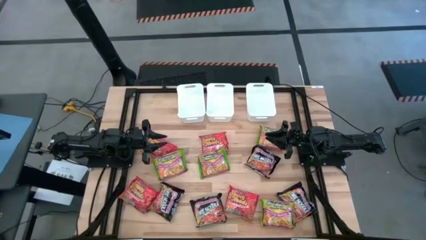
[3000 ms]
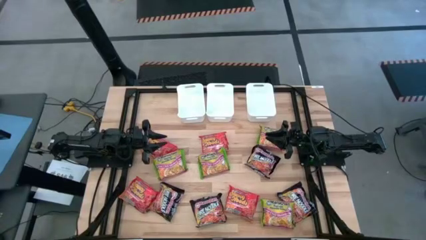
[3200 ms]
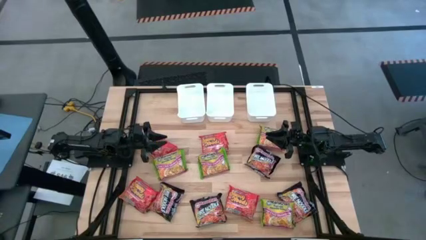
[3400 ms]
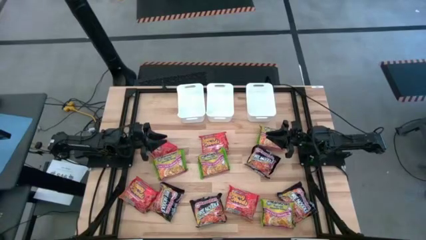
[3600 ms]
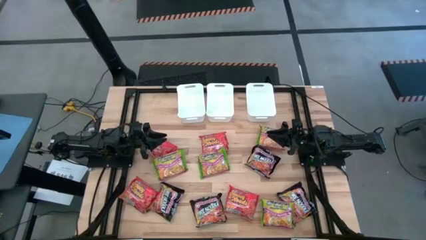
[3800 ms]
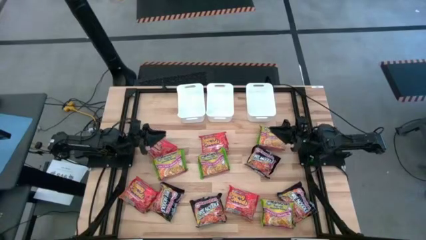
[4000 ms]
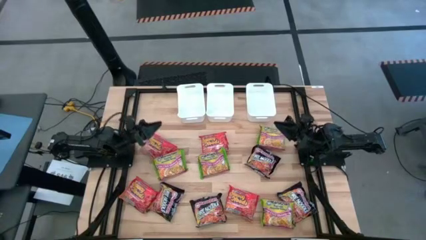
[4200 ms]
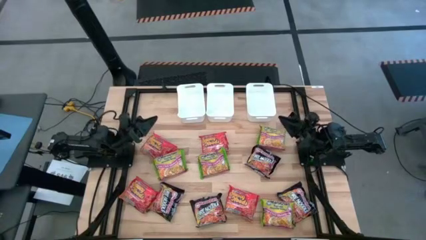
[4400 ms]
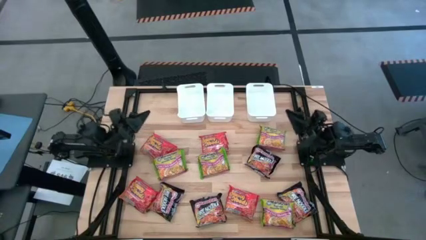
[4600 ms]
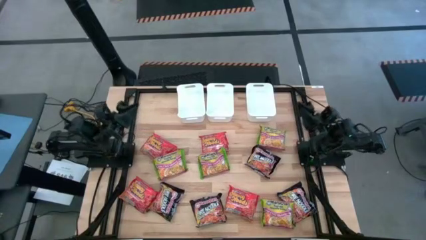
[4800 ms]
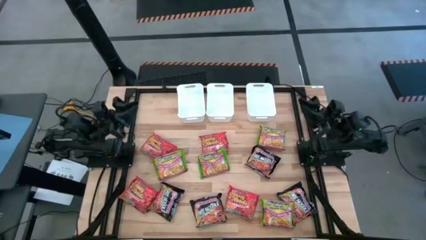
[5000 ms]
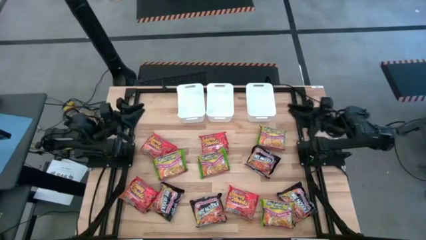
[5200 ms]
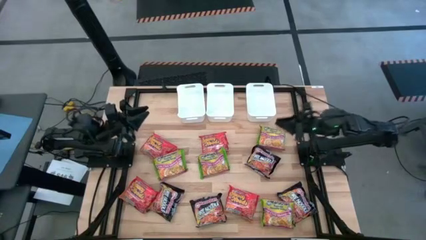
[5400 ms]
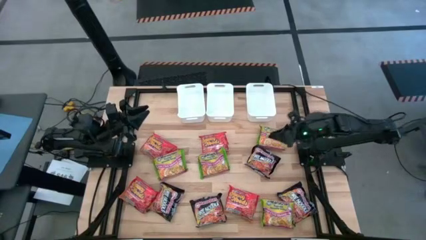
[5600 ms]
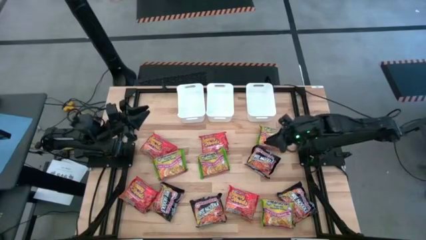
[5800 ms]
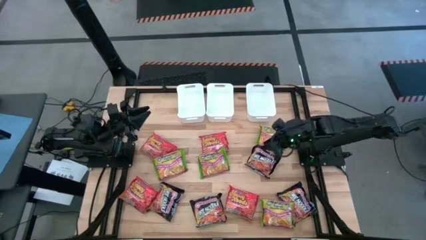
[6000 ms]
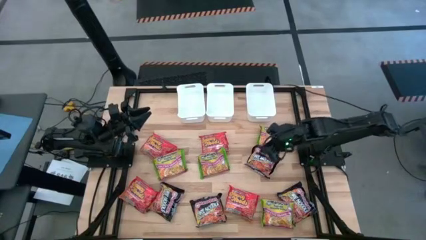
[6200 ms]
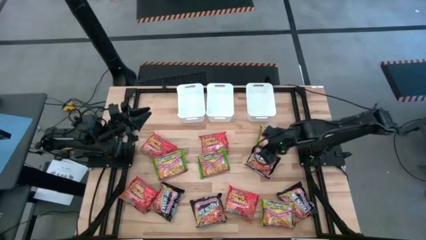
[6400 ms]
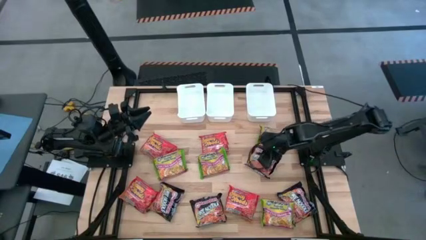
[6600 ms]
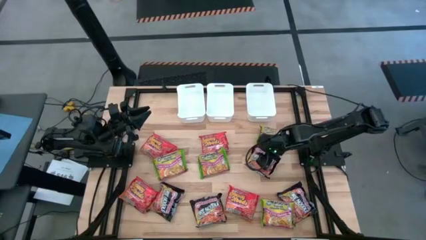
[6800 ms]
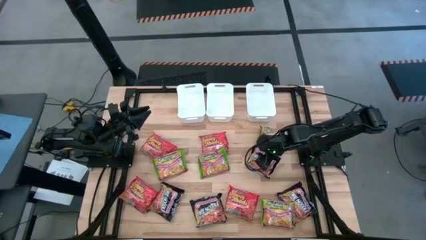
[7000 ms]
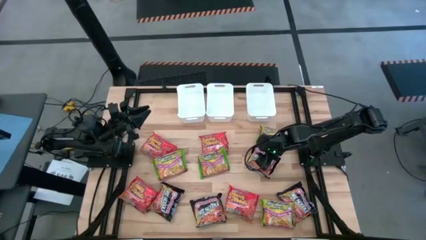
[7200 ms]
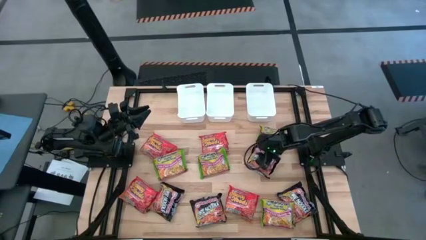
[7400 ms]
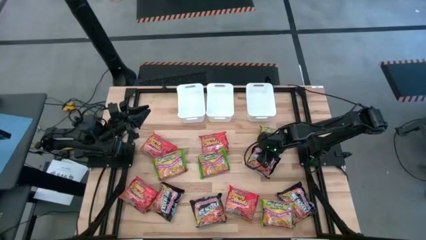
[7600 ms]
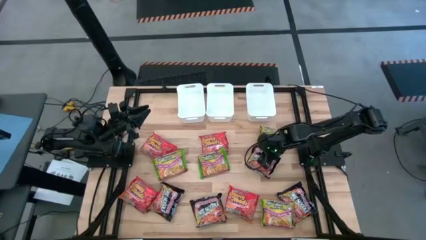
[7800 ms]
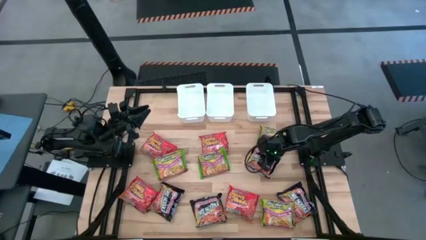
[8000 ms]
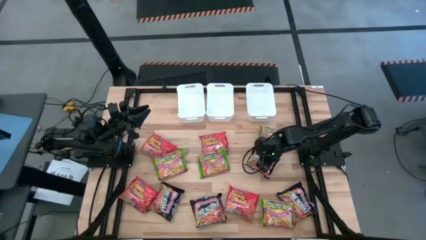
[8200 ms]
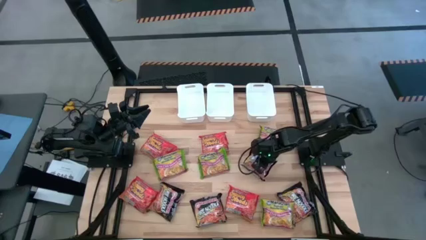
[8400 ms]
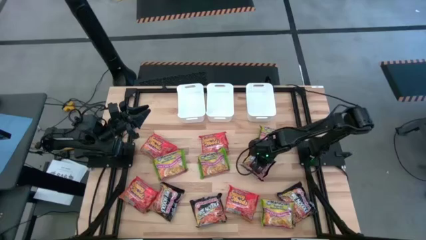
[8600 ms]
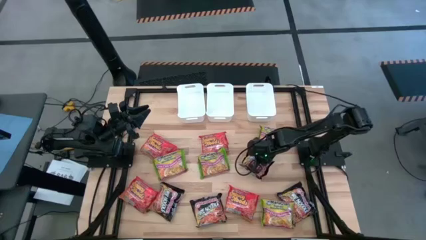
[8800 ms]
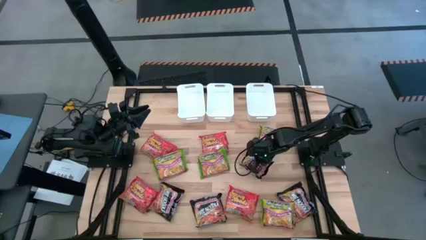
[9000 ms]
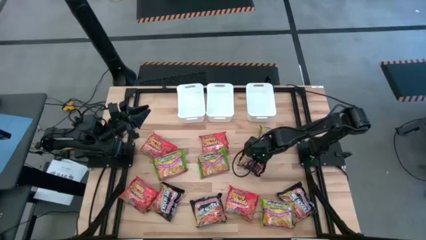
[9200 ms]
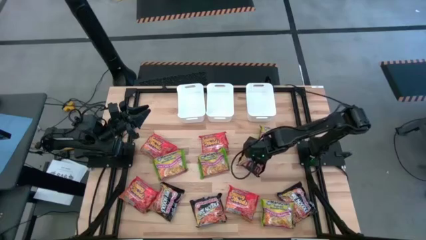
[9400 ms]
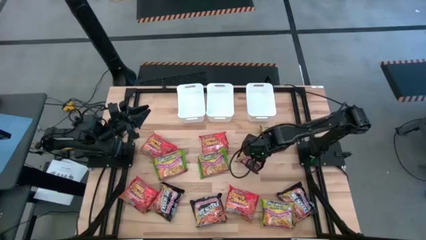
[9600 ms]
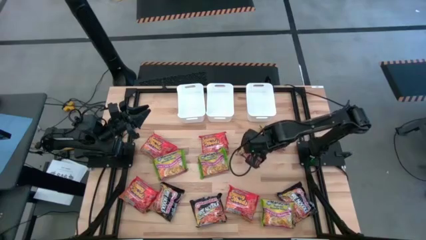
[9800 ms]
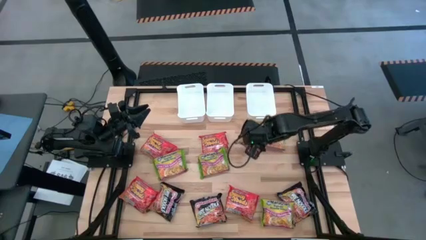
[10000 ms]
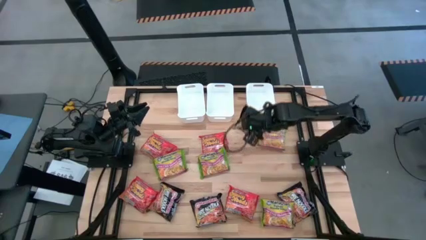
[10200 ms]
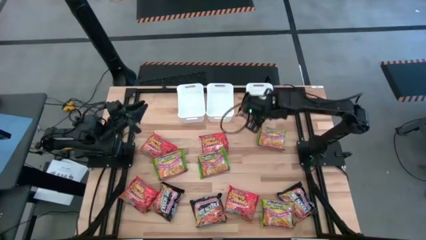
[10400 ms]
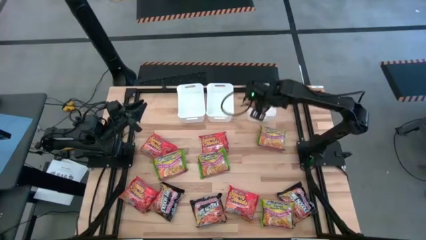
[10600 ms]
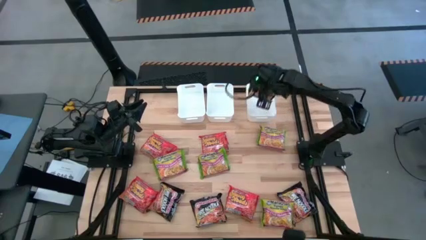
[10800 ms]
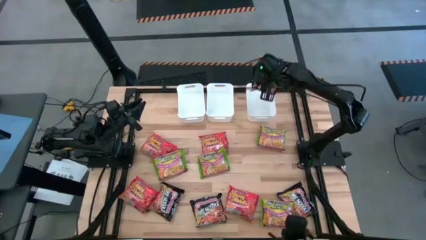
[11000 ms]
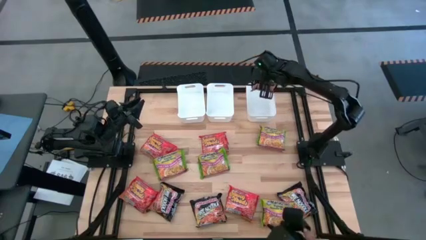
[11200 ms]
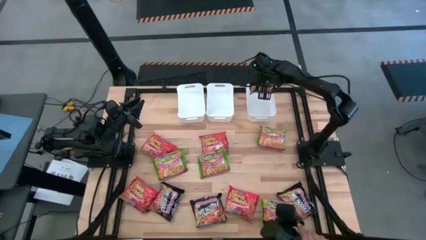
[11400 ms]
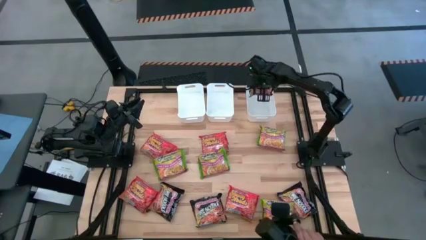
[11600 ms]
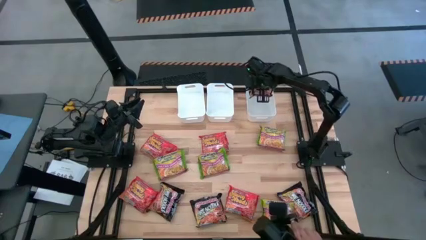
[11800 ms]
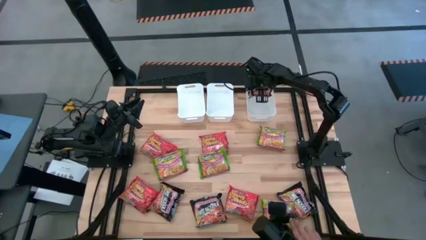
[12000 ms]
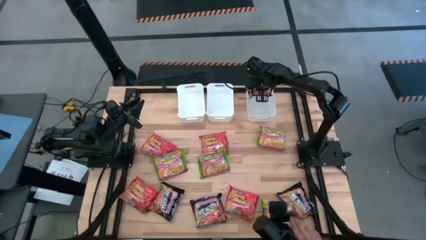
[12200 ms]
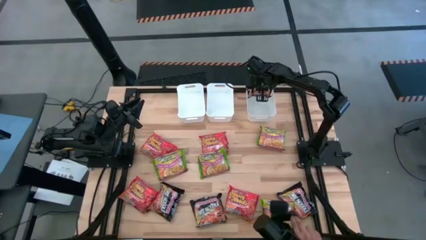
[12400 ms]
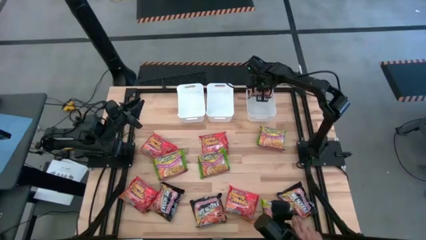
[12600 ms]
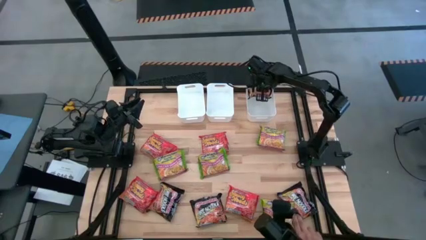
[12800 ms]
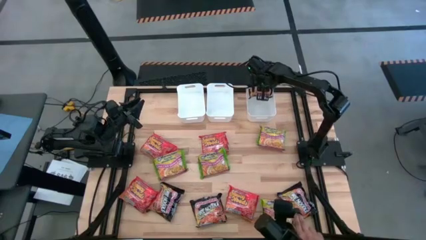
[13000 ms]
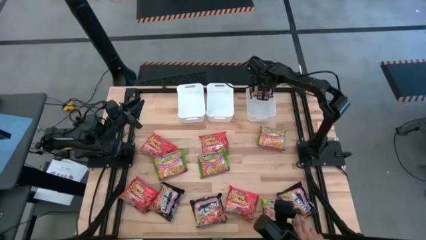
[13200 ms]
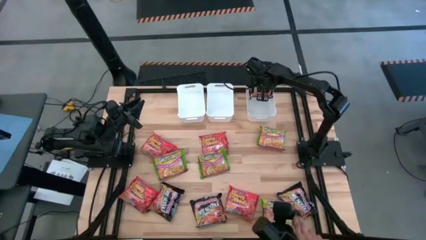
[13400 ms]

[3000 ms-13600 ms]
Task: Sort Maruchan noodles
Put the black noodle pack into the right white bin

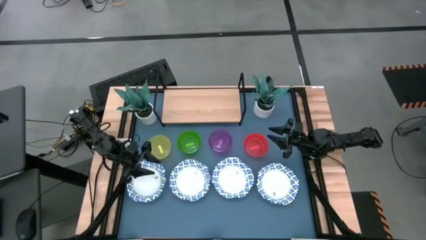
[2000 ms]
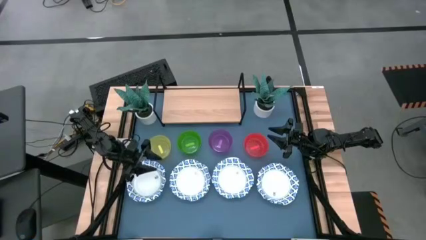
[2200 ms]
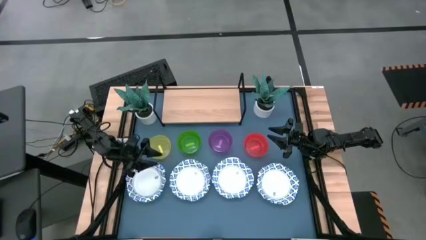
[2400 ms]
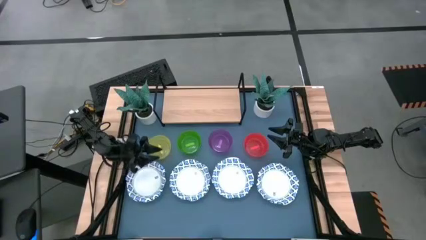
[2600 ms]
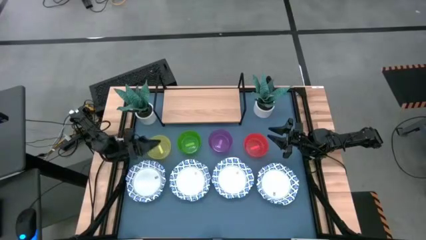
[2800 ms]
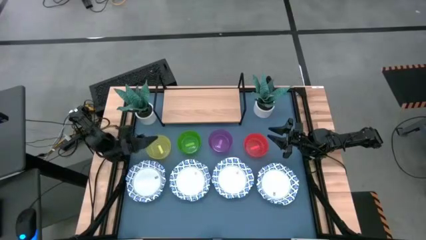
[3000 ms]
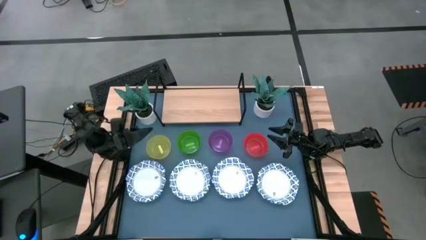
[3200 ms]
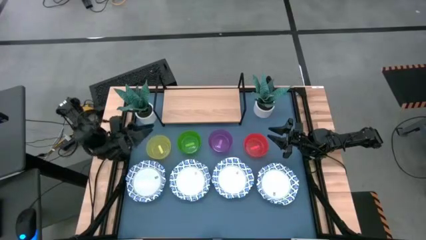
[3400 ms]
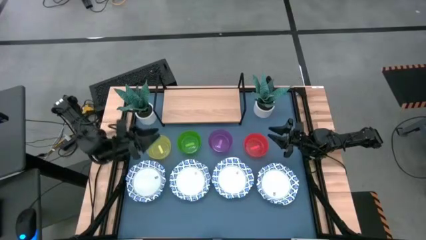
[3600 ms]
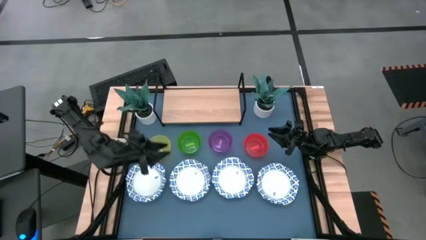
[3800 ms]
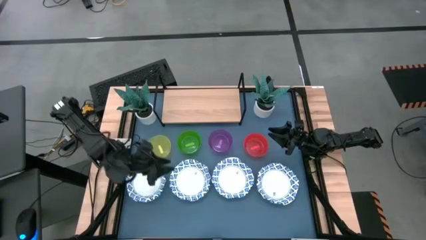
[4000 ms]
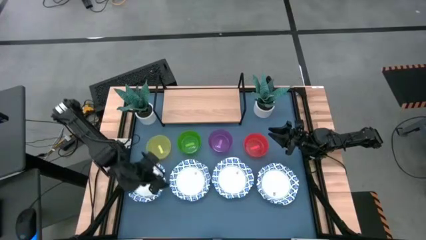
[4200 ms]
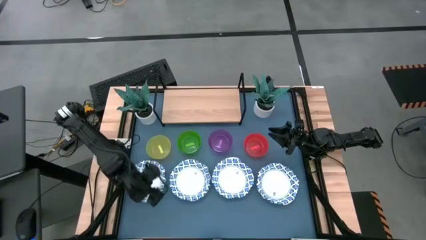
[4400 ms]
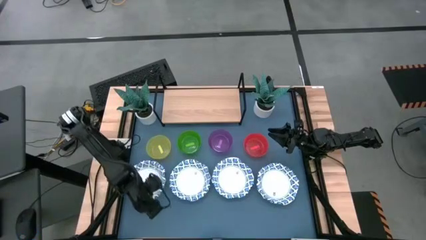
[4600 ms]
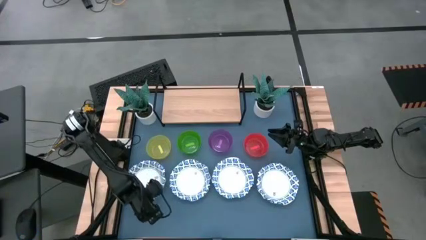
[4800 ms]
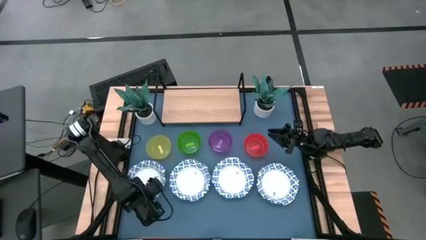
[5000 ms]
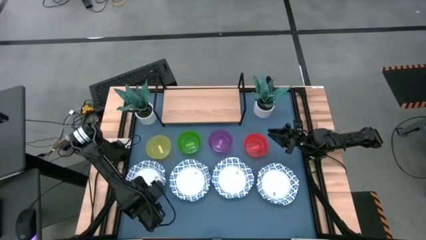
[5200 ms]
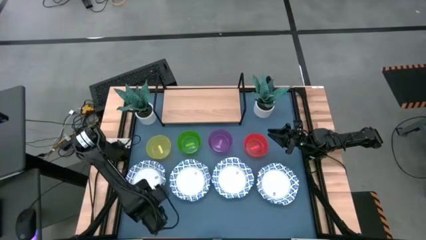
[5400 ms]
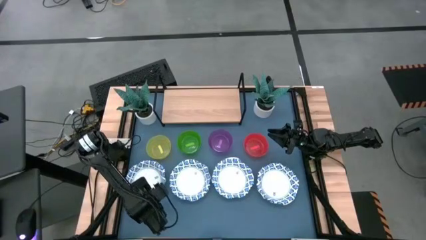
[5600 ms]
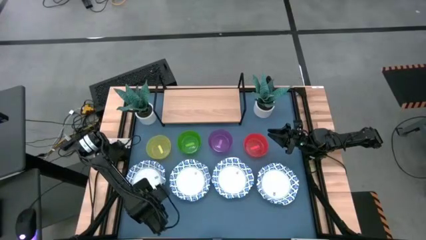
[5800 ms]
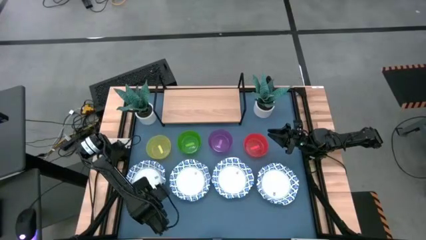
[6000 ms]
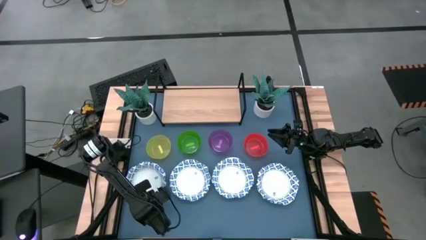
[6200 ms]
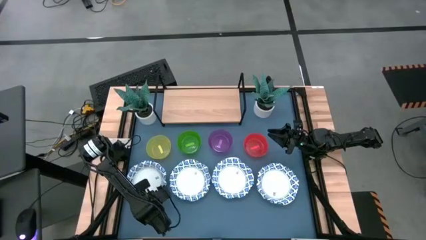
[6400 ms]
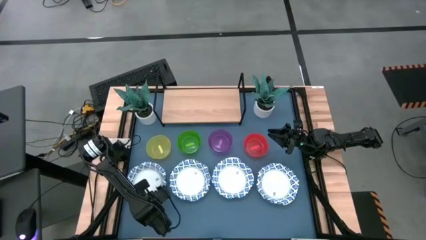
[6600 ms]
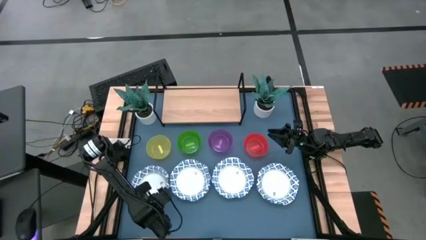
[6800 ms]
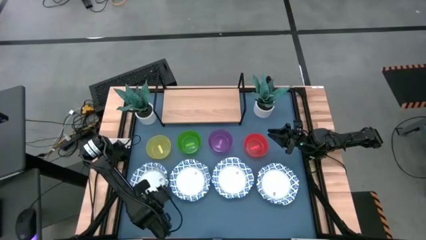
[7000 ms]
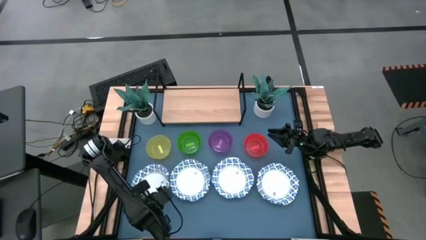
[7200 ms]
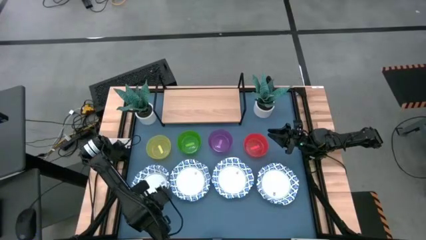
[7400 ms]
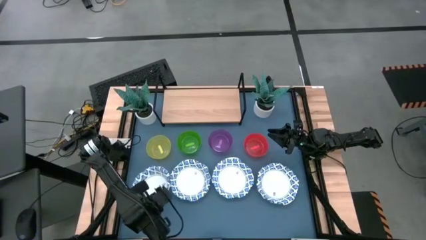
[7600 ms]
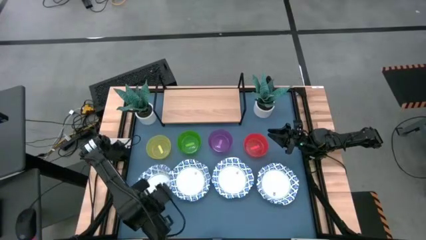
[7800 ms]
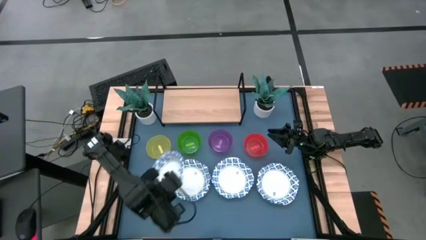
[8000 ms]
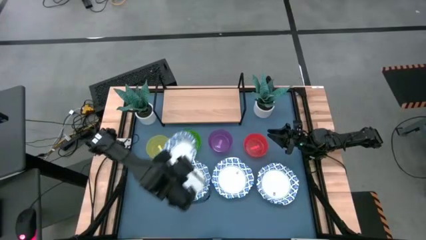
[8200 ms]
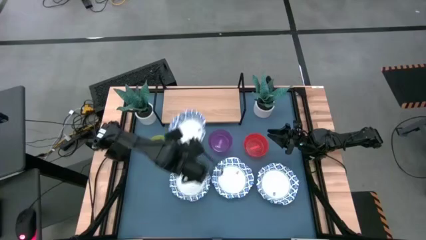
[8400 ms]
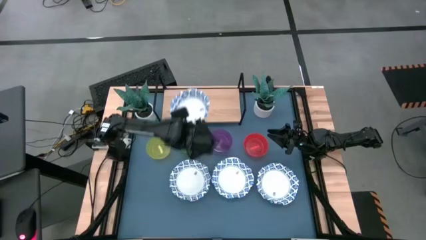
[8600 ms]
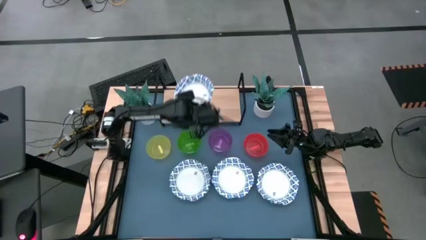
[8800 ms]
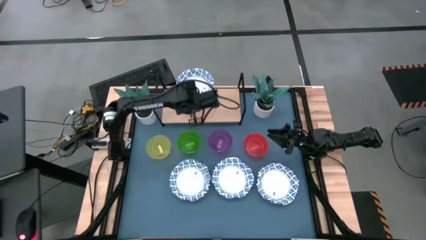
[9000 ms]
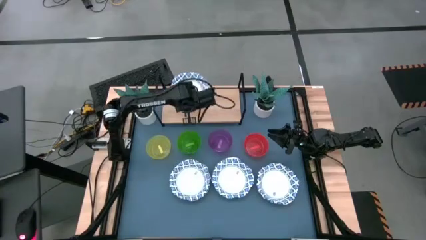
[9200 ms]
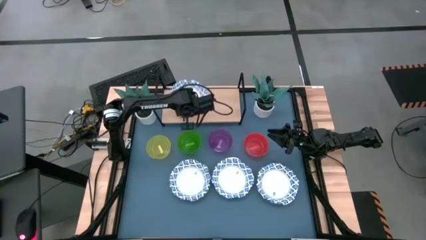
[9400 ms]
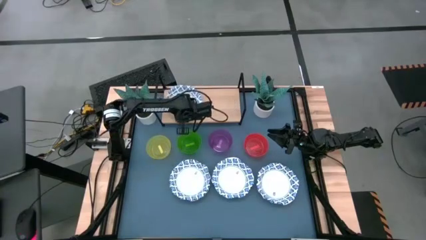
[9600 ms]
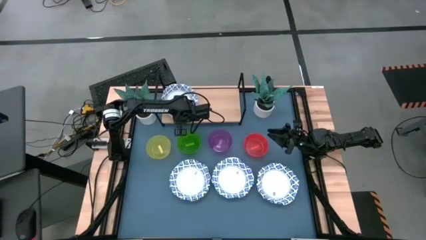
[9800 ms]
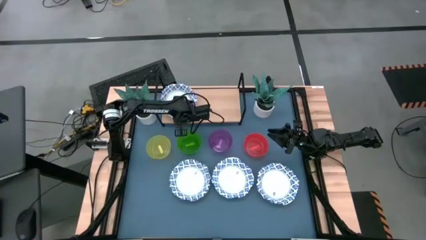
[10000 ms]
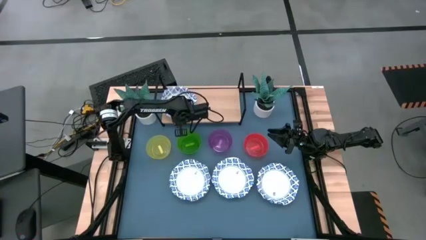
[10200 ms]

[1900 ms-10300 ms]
Task: Place and stack bowls onto a shelf
Put the paper bowl on the shelf
